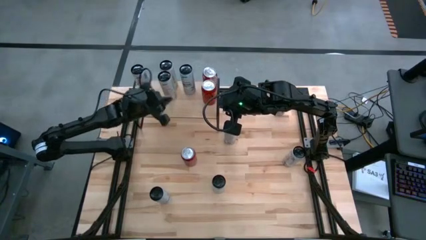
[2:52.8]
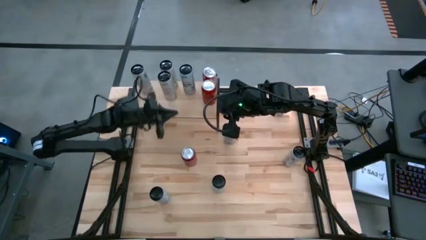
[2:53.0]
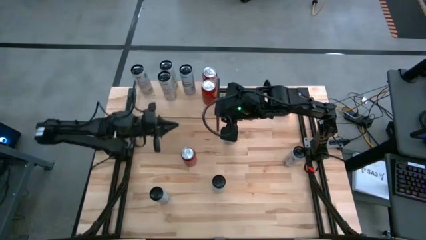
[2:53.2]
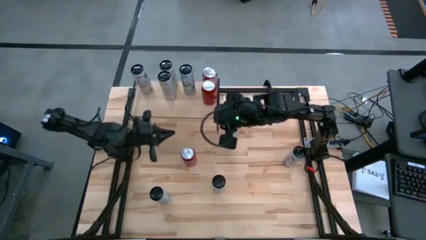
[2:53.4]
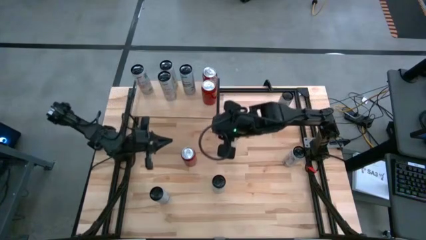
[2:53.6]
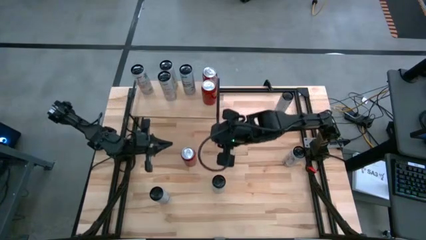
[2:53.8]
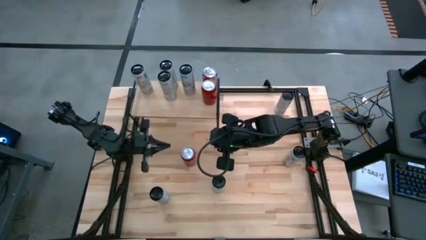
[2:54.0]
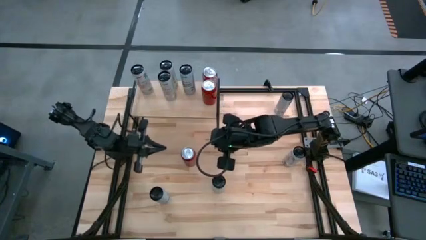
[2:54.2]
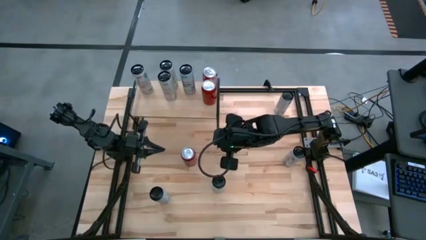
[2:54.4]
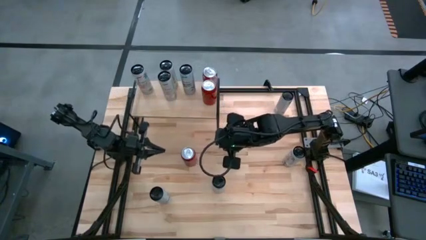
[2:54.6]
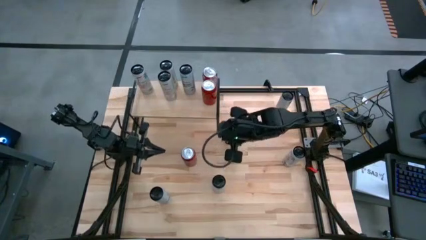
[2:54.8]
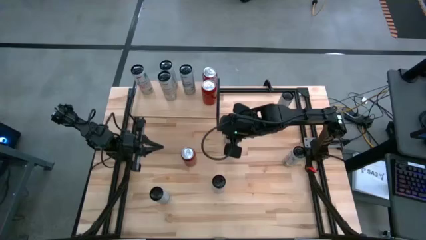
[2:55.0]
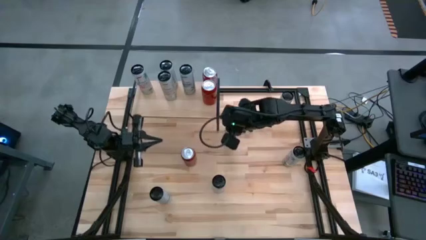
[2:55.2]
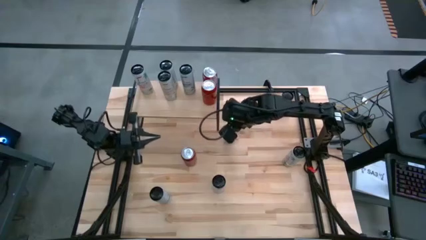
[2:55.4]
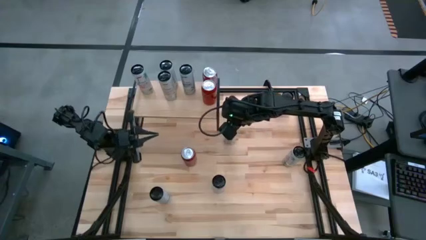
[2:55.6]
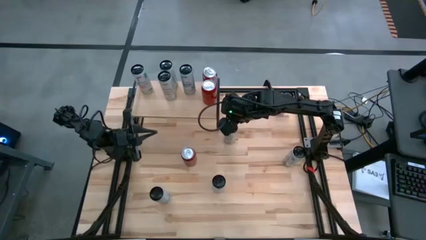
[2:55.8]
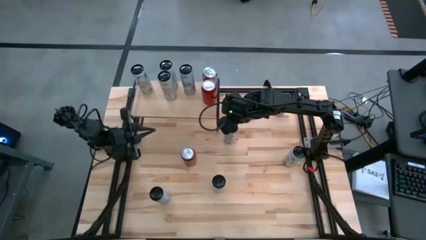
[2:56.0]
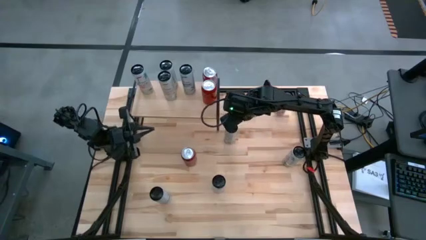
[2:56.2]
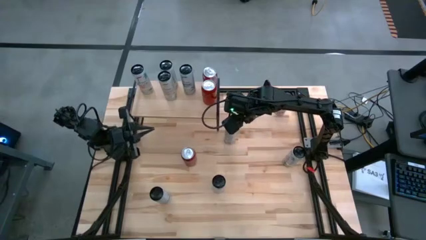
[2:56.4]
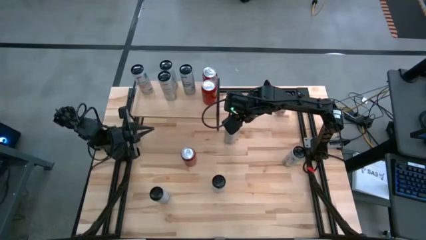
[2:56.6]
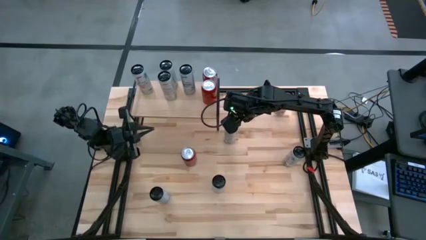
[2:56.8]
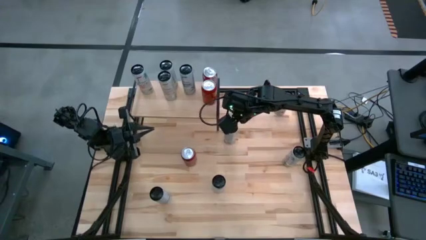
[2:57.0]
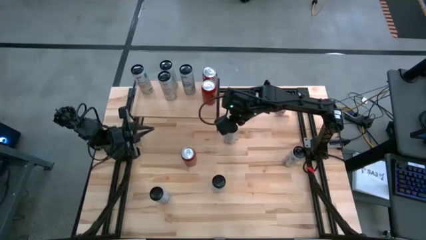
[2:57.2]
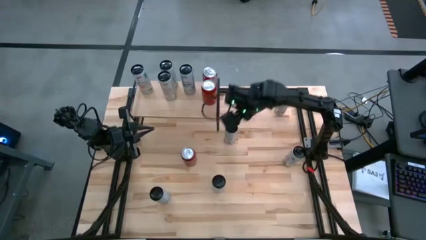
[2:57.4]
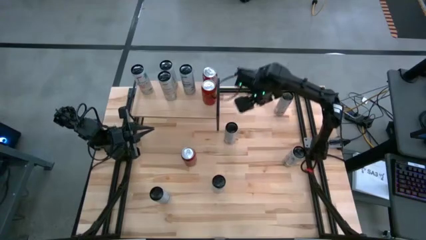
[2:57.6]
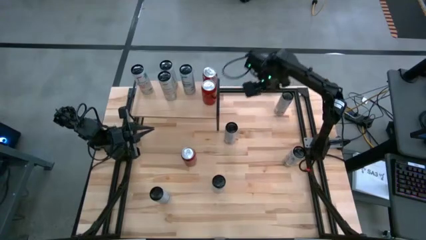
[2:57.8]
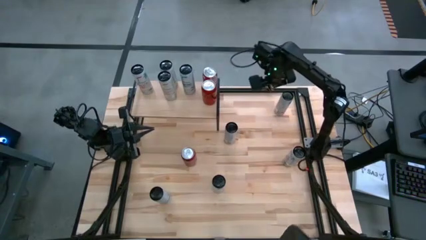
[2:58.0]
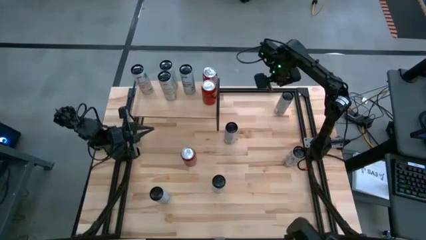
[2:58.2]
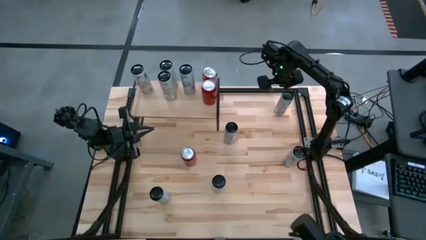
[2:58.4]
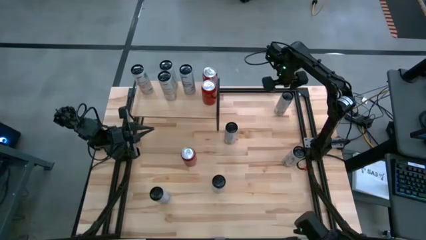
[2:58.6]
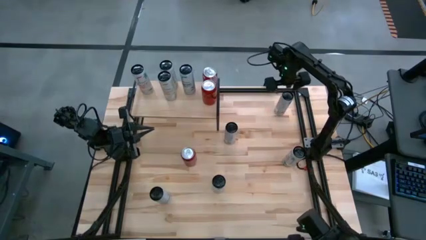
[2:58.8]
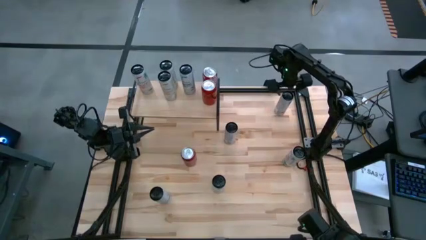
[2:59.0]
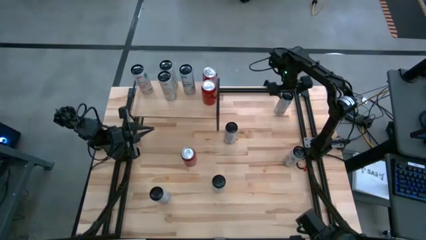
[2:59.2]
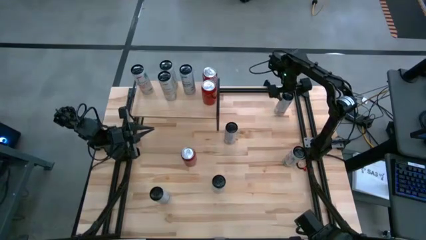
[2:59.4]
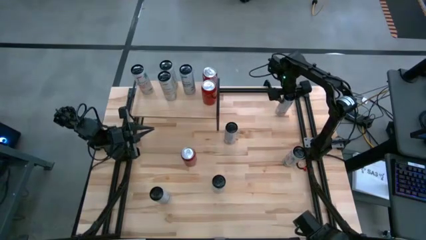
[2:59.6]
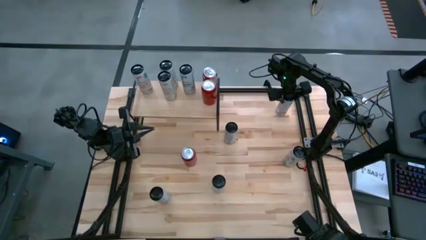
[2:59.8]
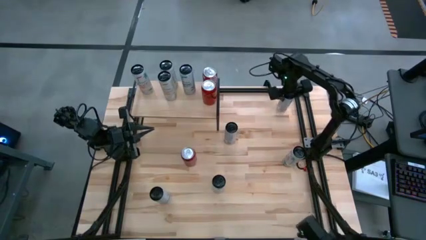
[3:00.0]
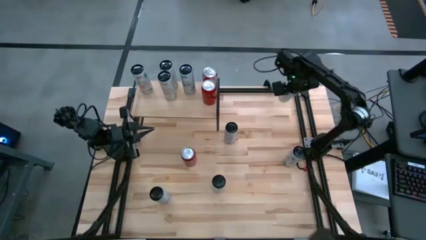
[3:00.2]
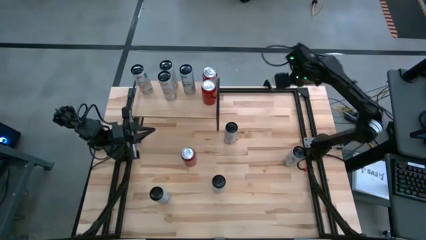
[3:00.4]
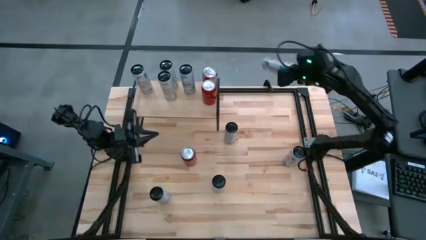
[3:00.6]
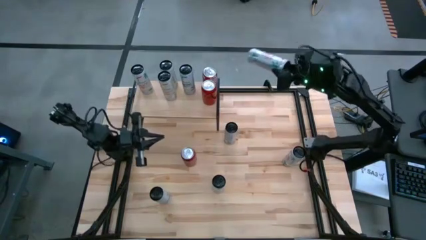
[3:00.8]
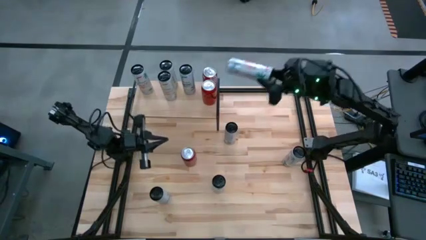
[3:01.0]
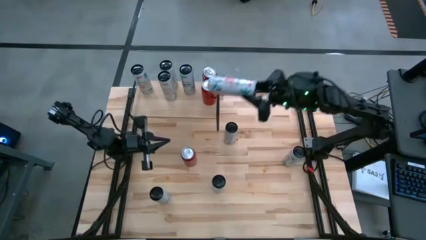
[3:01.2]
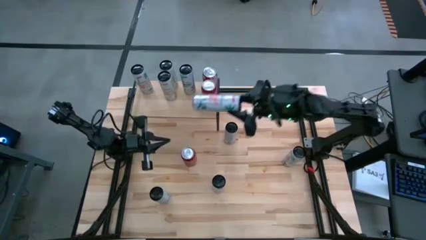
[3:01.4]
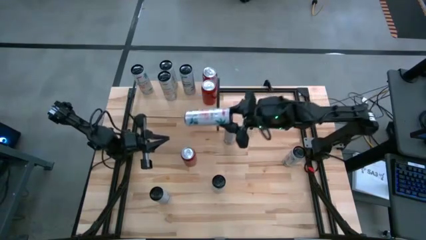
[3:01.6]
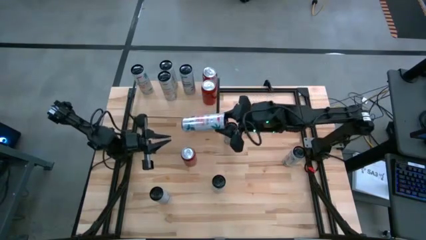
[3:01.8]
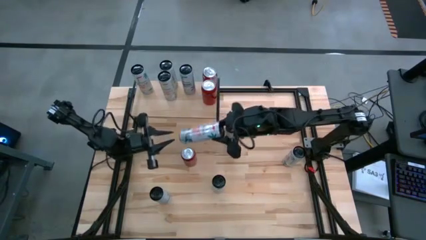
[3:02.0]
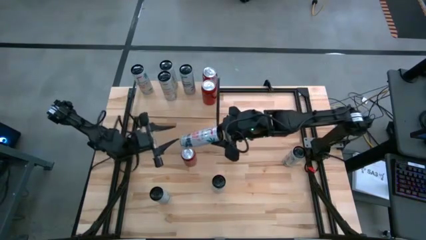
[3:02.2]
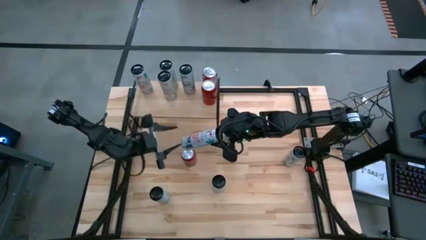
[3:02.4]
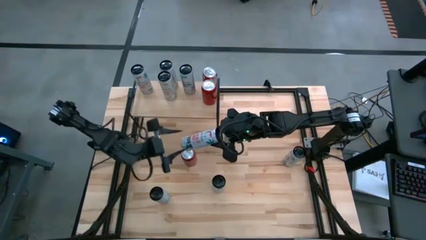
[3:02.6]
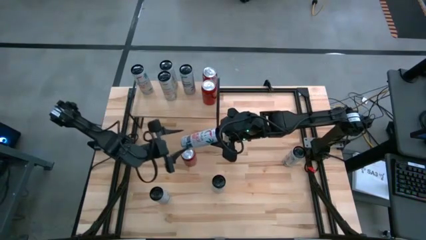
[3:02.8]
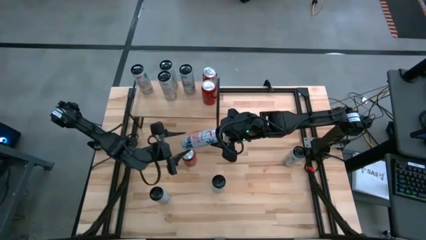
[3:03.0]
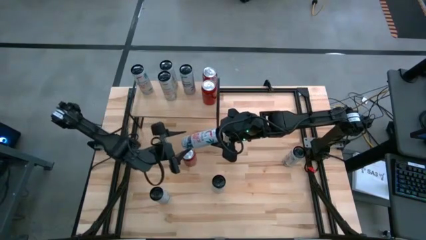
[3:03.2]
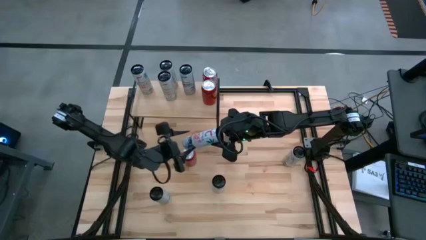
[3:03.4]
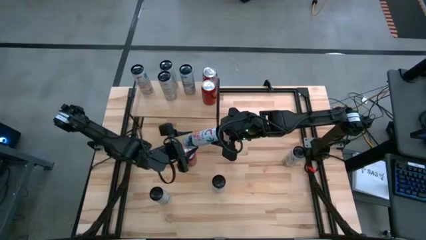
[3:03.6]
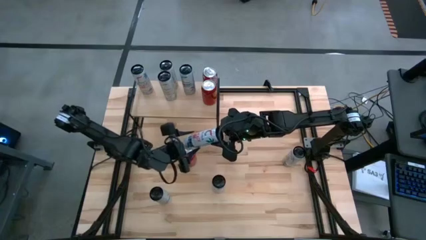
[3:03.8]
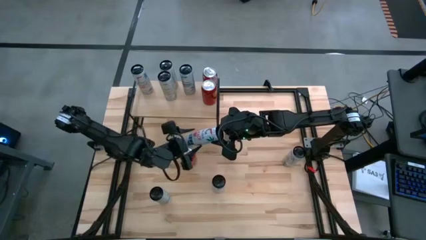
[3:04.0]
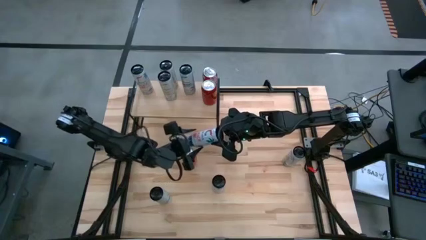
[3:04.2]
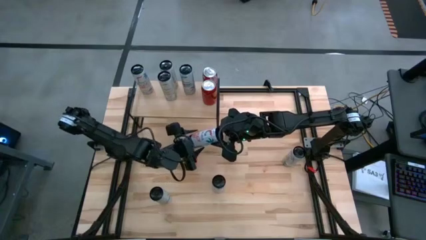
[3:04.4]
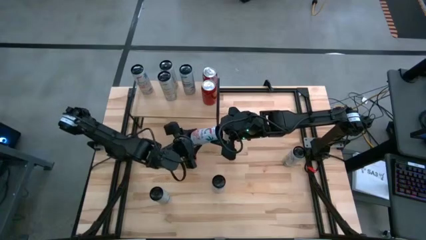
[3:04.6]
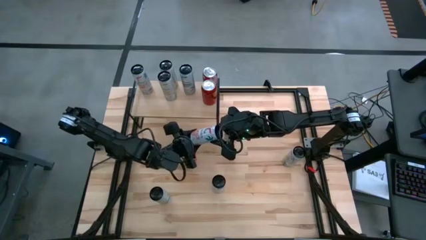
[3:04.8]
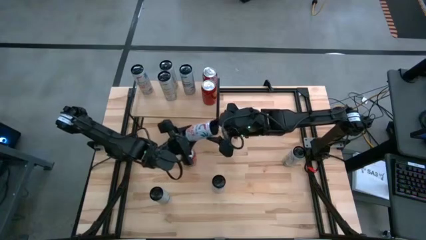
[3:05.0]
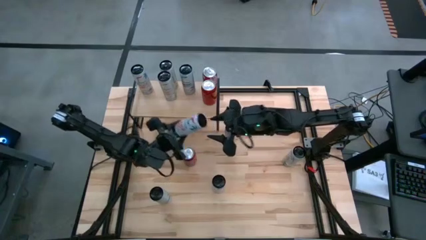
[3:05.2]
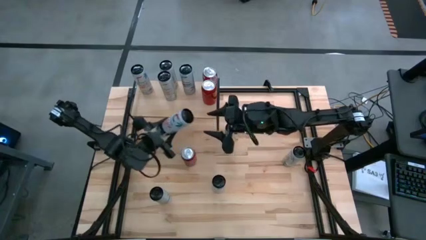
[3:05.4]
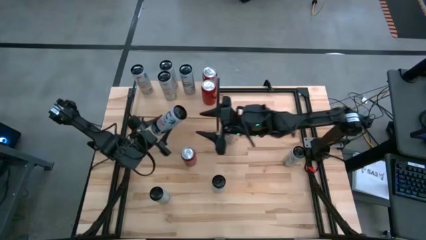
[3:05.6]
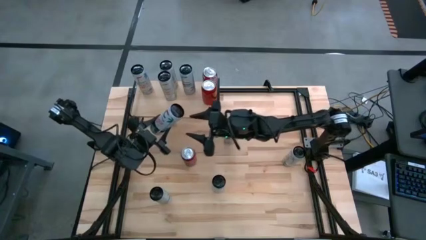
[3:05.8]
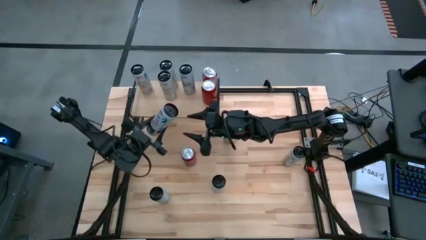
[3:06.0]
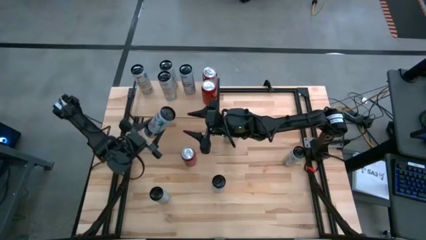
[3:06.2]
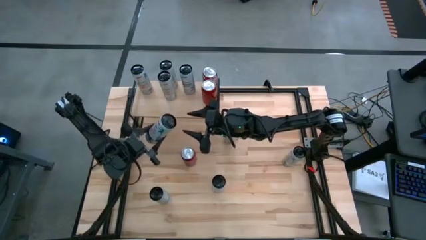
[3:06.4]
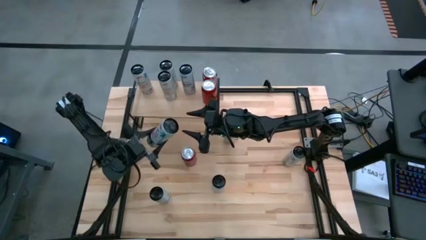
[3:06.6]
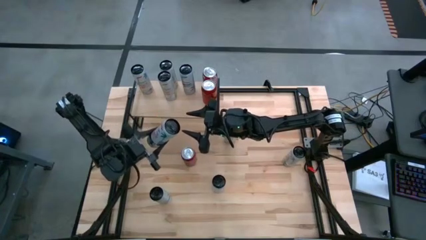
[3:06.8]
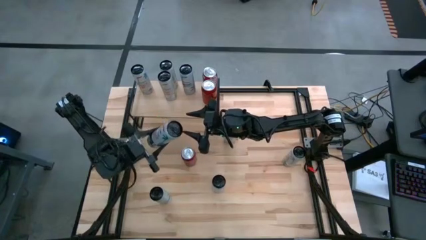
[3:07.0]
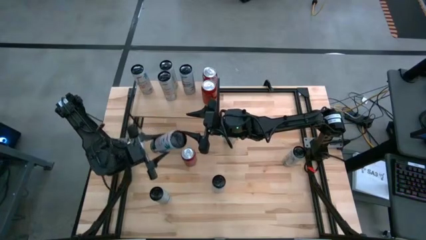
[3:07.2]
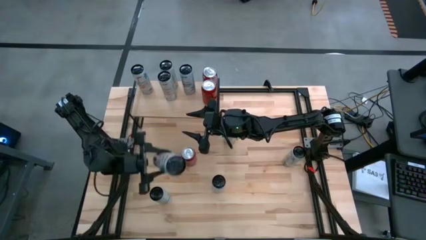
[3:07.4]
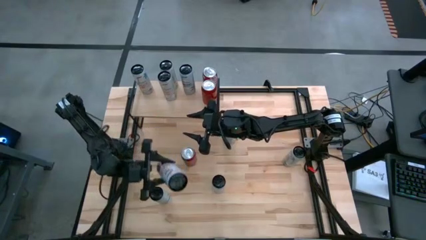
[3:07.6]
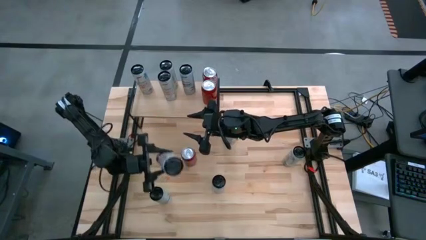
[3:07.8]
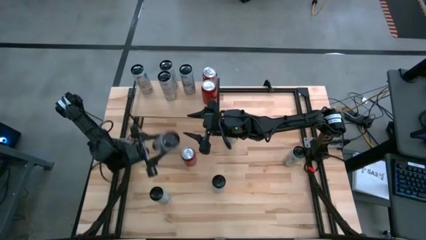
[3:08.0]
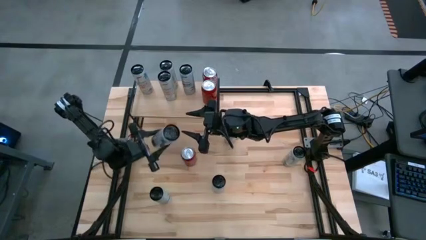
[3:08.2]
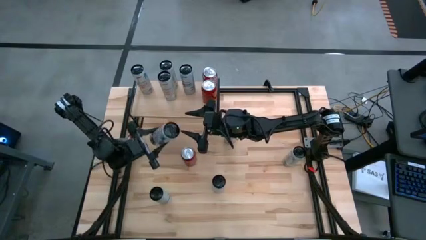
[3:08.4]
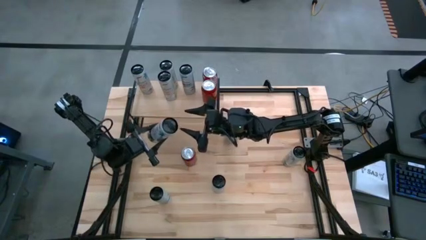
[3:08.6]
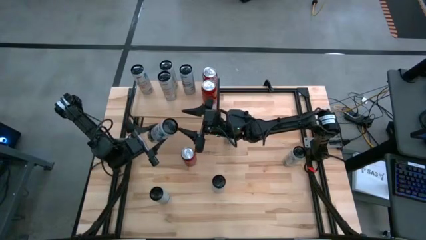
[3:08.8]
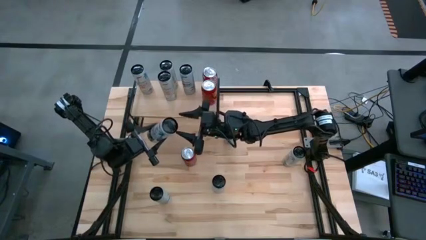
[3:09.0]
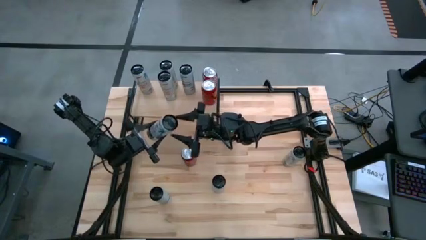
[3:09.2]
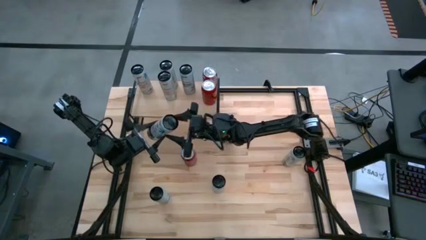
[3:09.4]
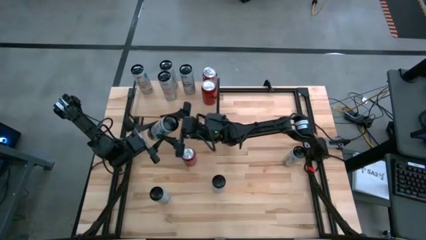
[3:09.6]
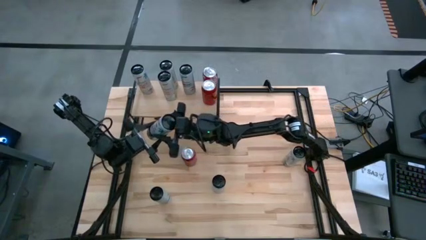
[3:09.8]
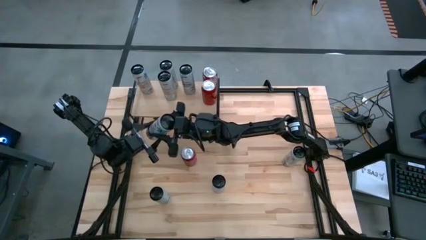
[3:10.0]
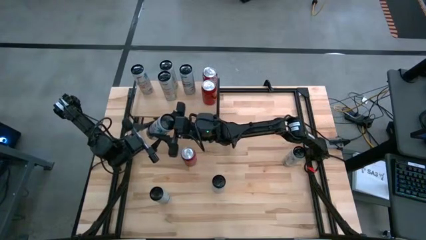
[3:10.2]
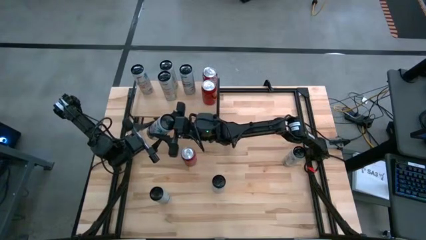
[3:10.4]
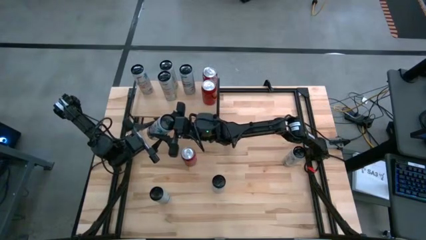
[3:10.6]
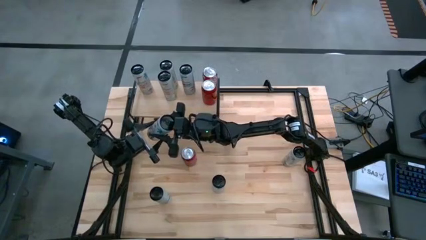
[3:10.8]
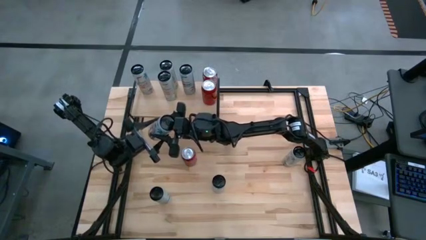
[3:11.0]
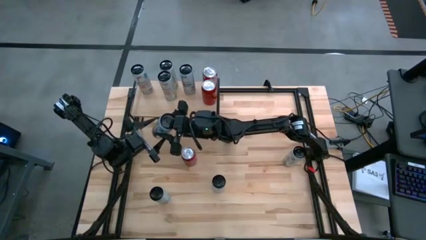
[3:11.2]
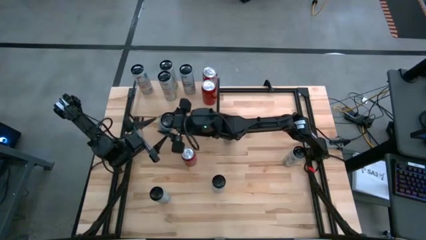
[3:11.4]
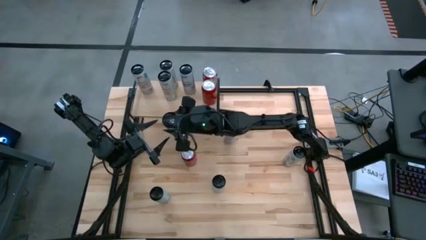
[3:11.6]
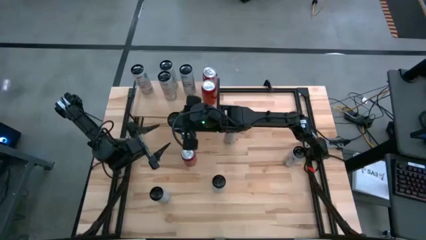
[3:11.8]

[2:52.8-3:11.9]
Task: Place canned beverage on shelf
Put the top white pink soda can on the shelf aligned with the other white pink soda can
